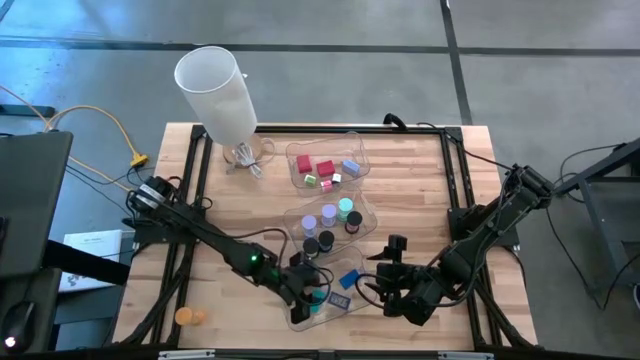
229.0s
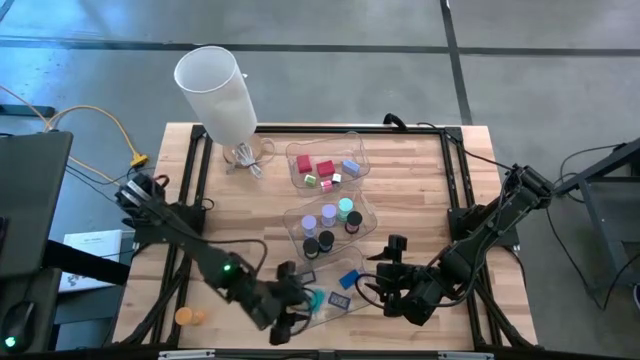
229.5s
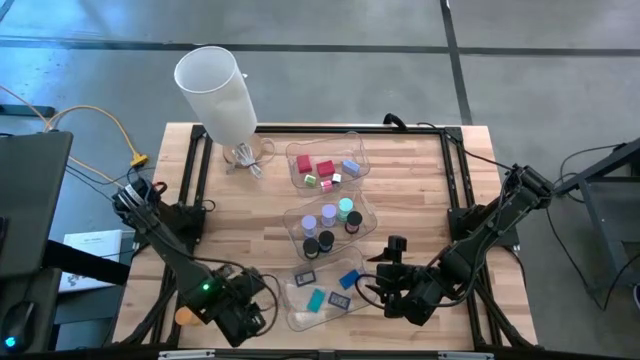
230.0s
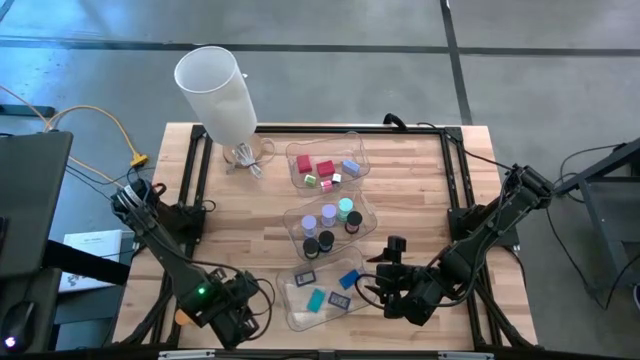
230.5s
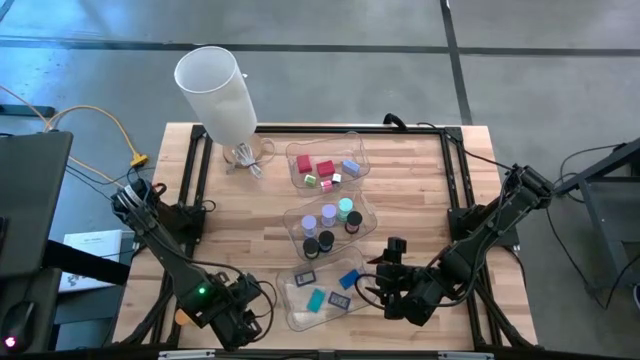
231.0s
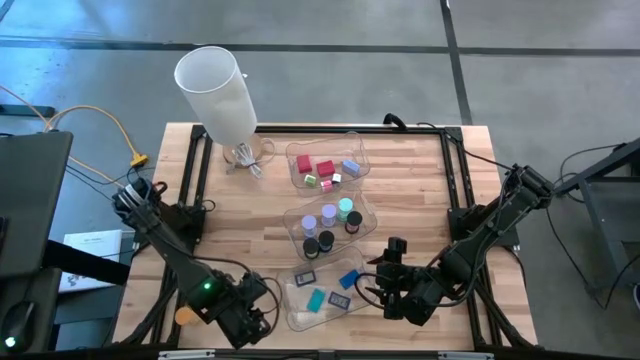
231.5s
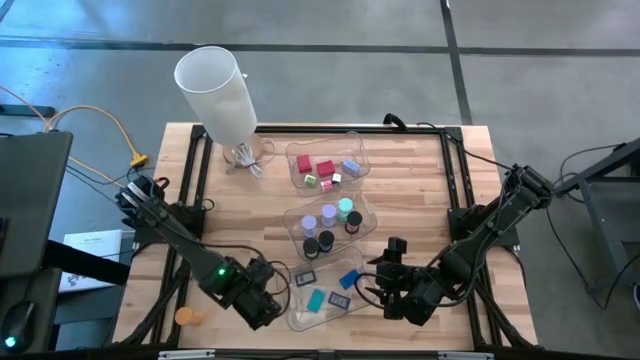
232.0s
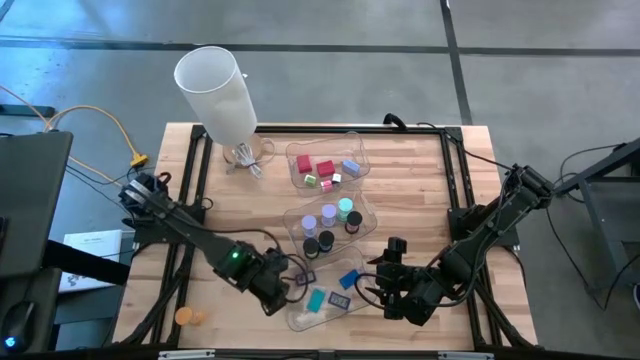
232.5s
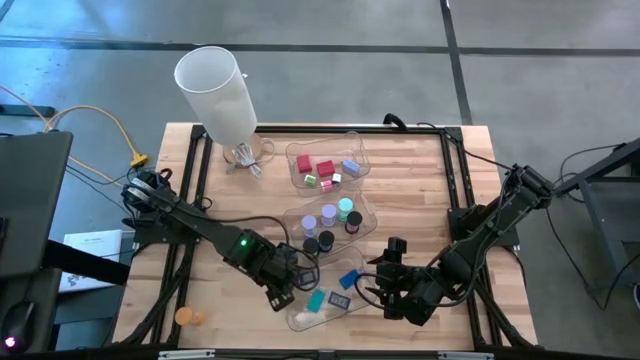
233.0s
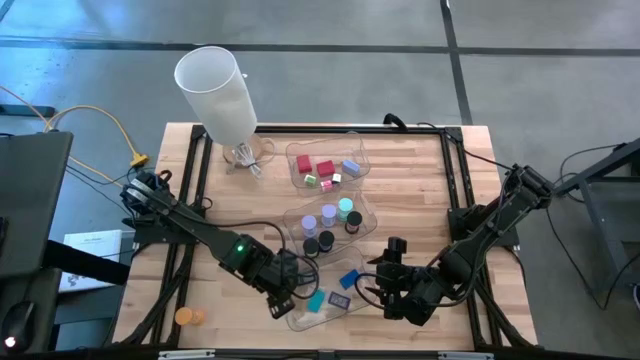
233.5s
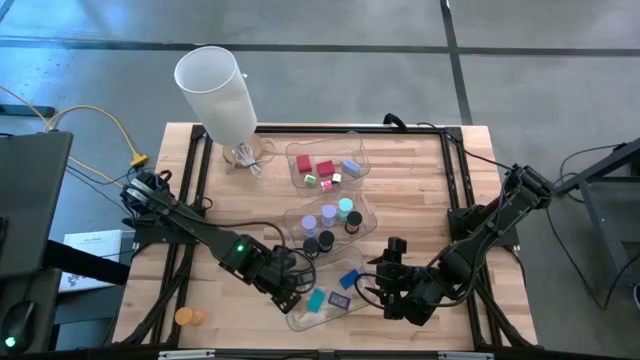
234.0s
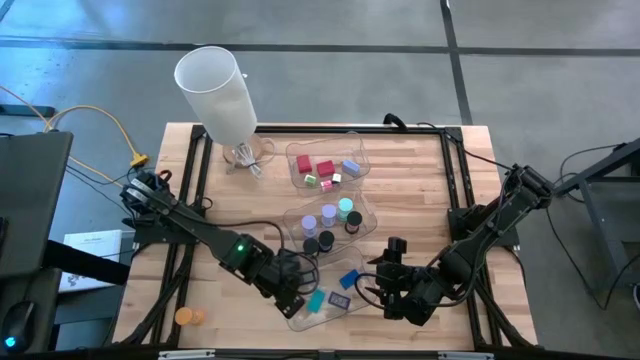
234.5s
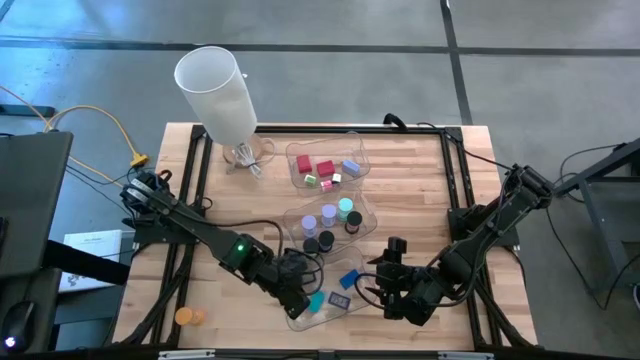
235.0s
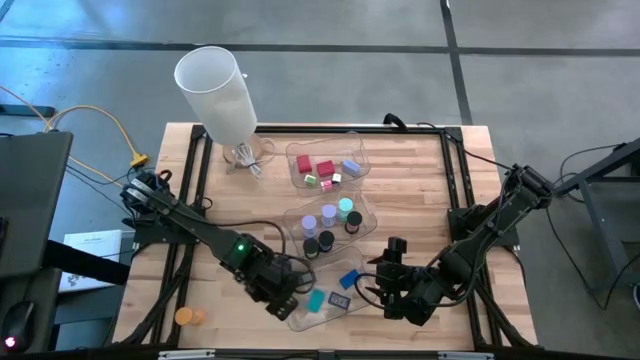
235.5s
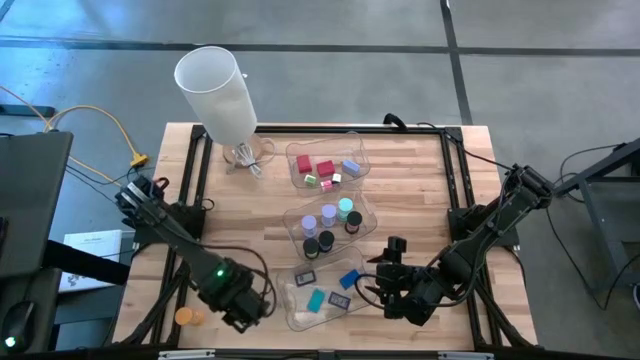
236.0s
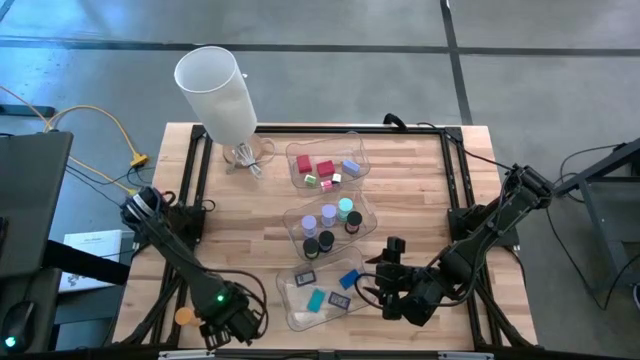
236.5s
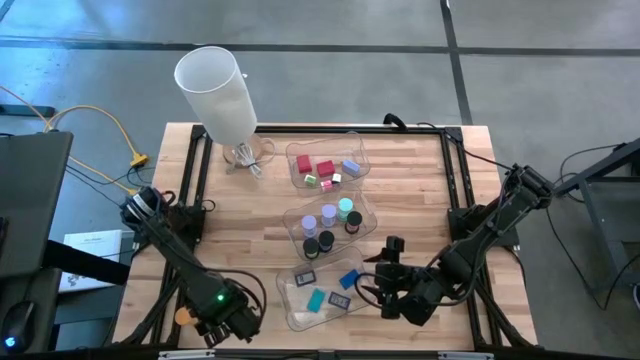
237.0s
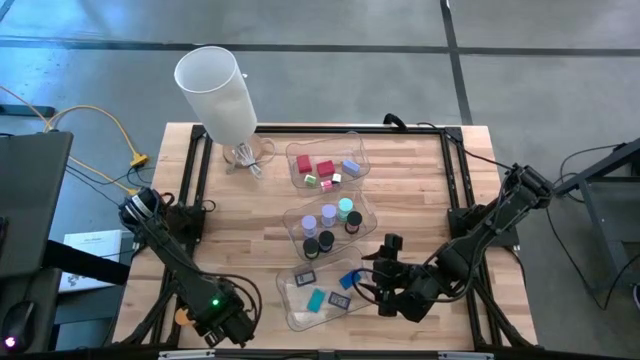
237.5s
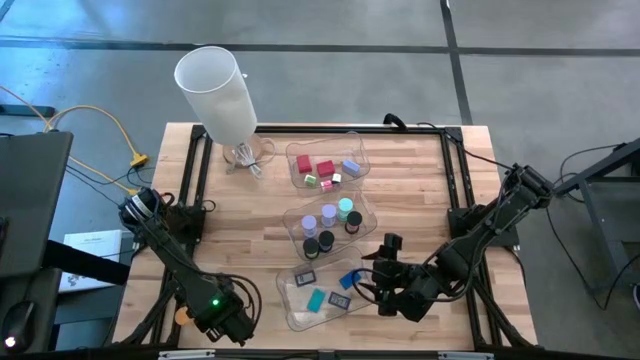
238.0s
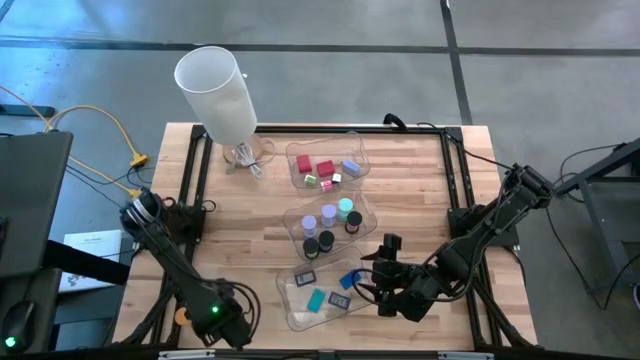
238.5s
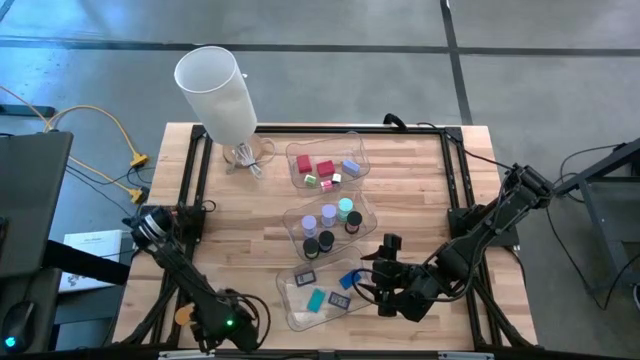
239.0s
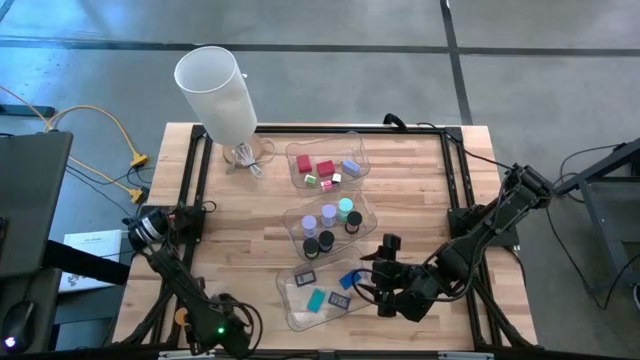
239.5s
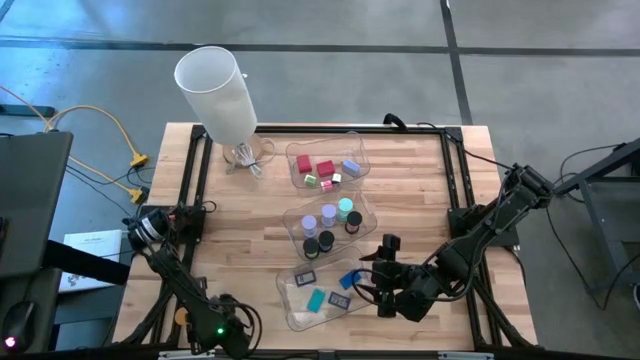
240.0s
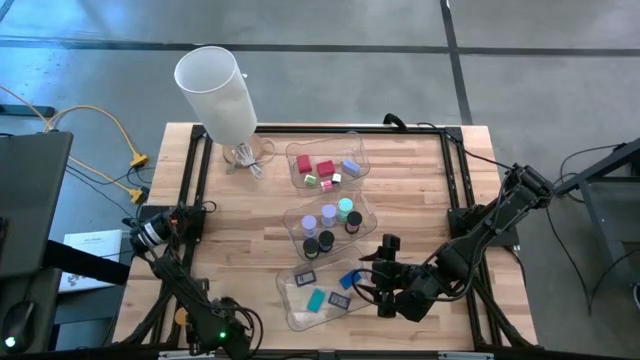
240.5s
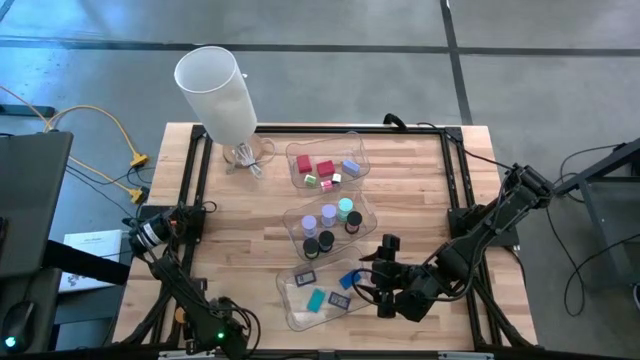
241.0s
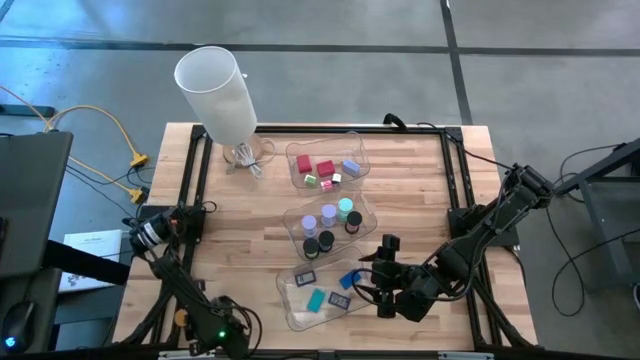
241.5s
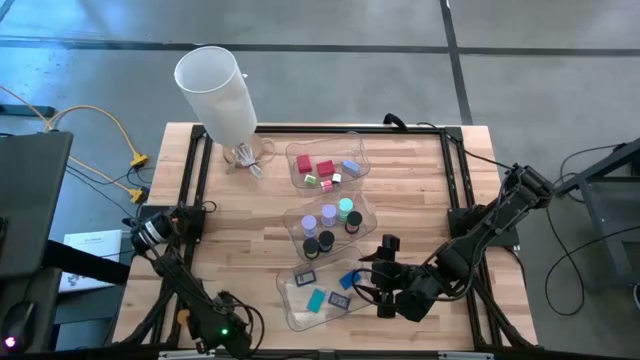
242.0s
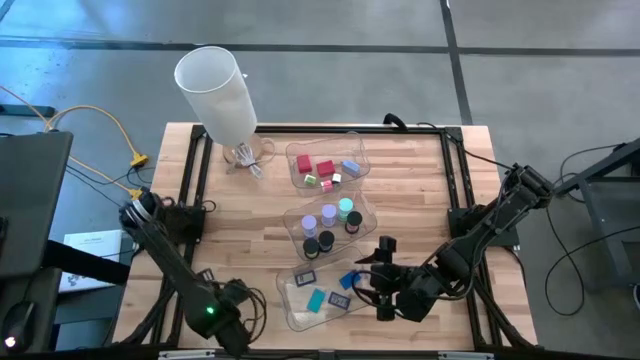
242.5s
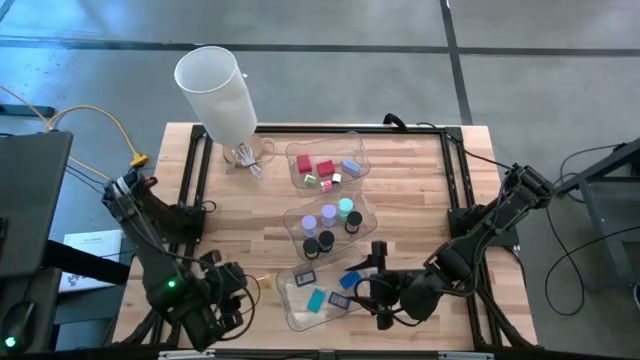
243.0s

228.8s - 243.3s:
Task: Pick & Place Office items
Put the yellow hourglass into the middle transparent bin

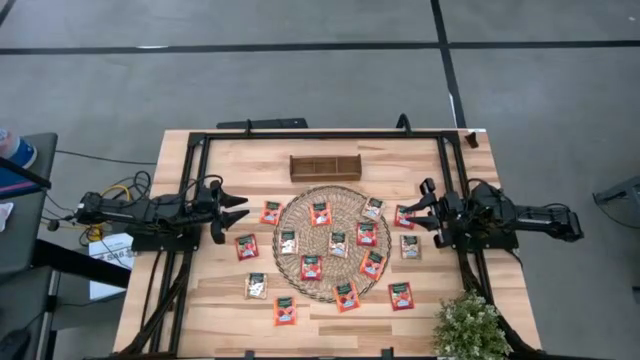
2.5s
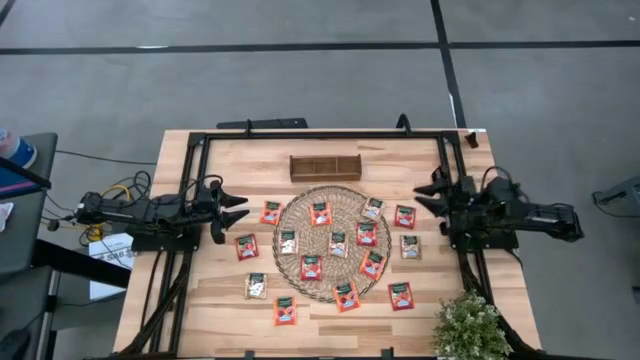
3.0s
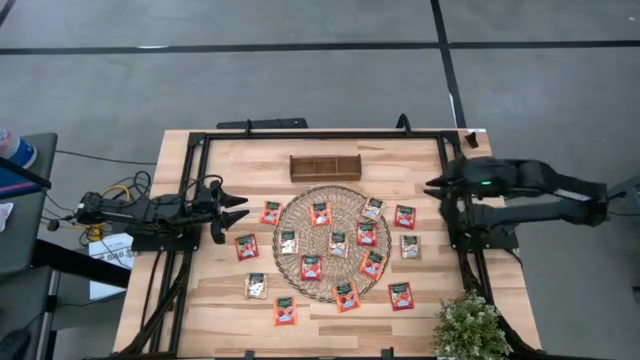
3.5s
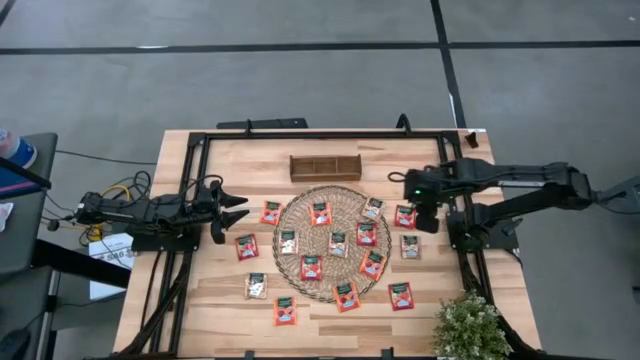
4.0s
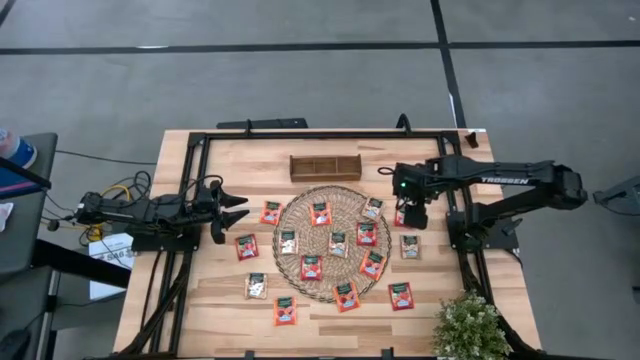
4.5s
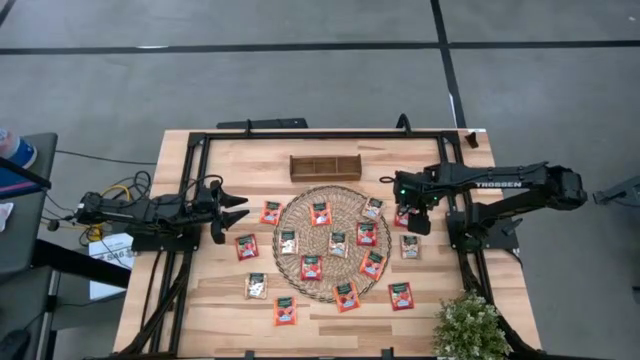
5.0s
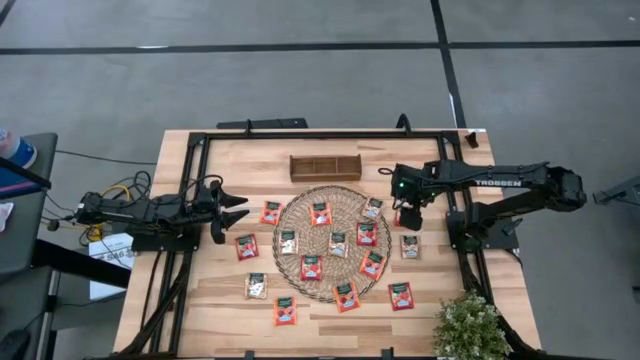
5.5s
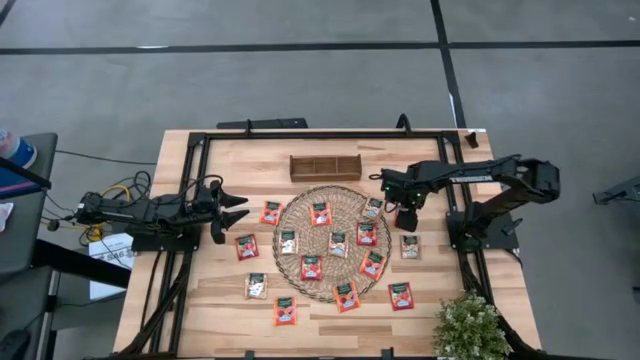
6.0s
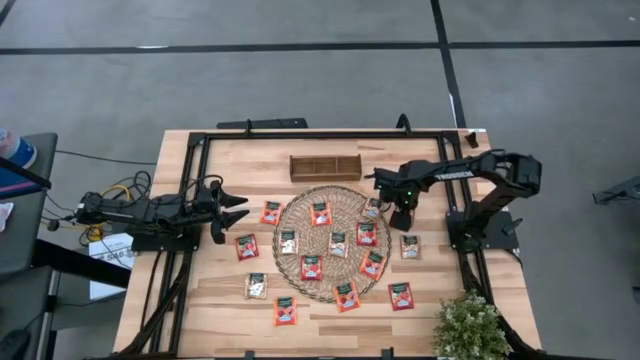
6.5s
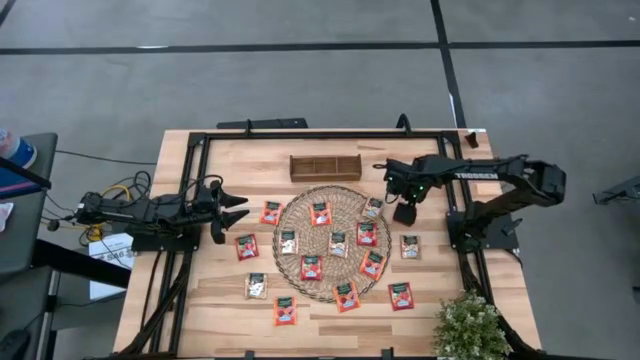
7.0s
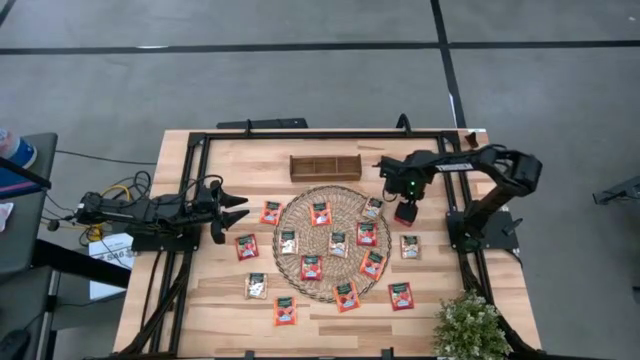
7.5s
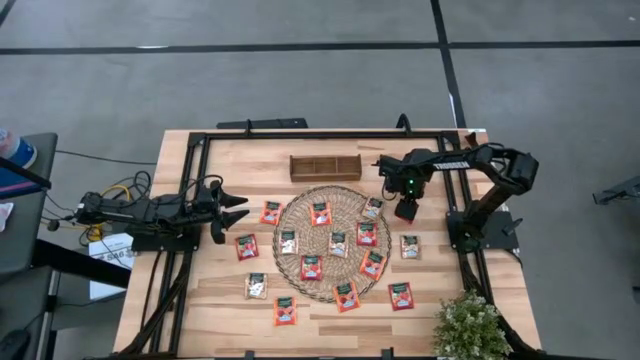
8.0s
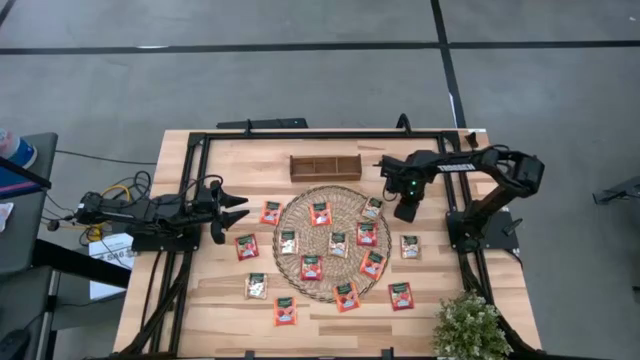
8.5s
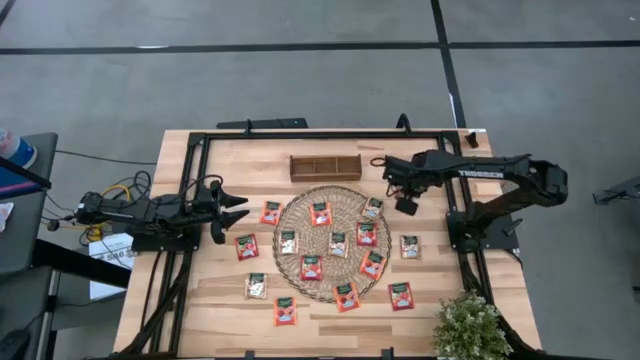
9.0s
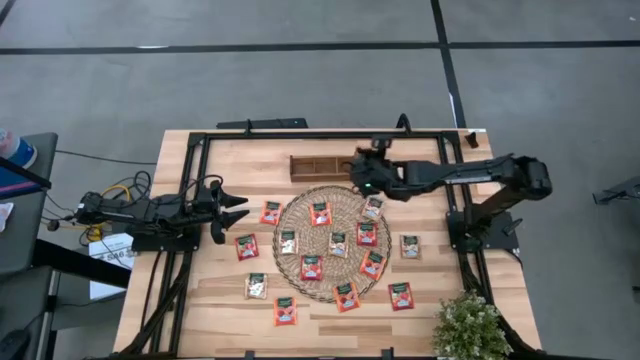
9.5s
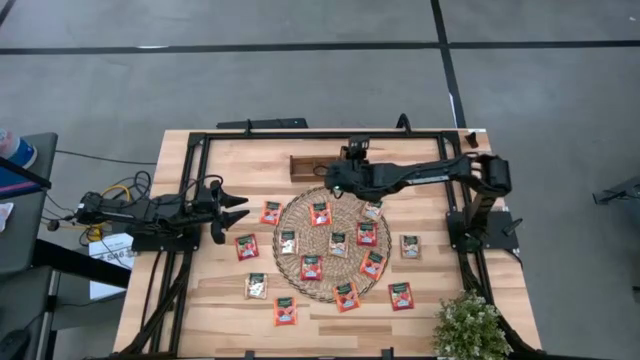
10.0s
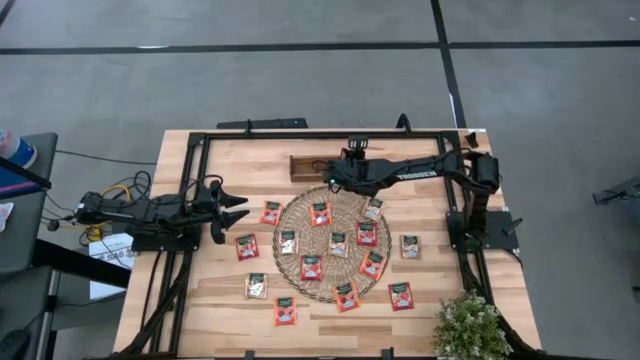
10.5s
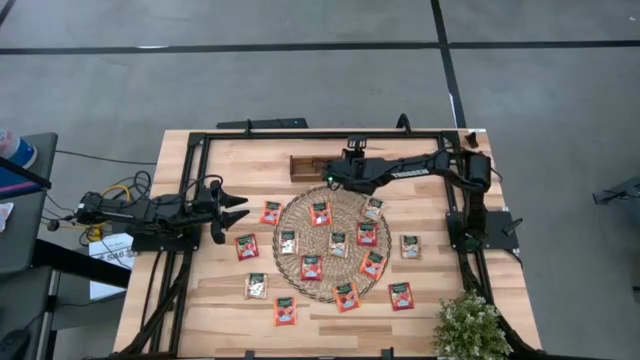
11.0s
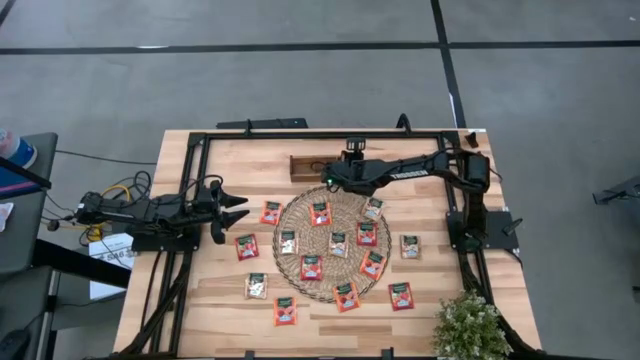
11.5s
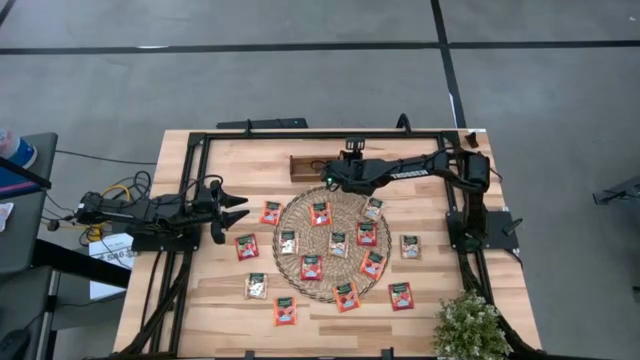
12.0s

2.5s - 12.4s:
Task: Pick & Place Tea
Put the red tea bag into the right section of the brown wooden organizer
